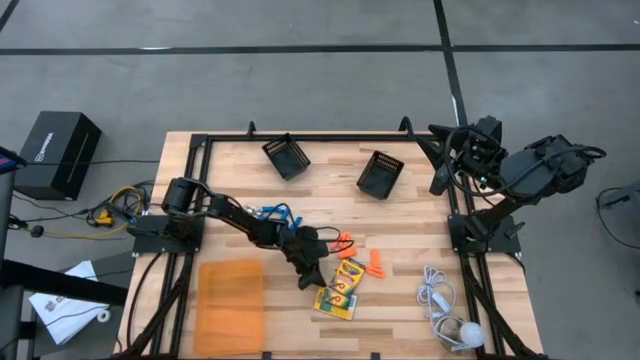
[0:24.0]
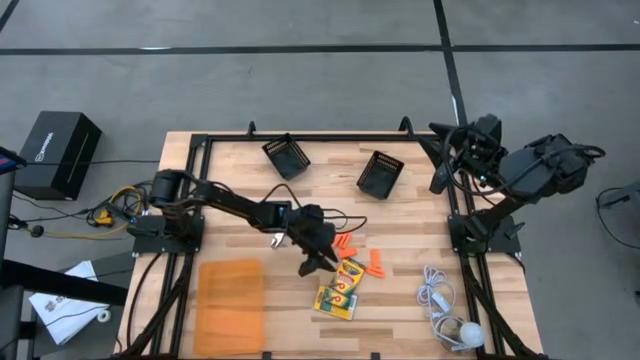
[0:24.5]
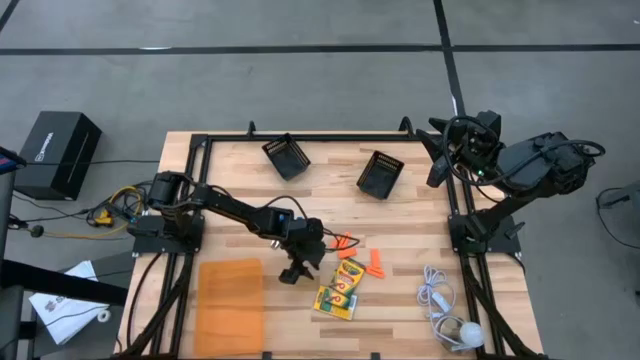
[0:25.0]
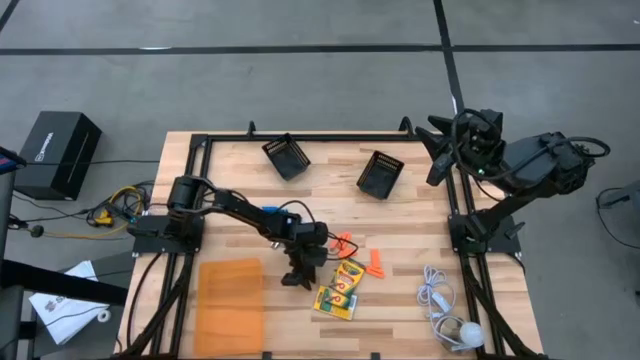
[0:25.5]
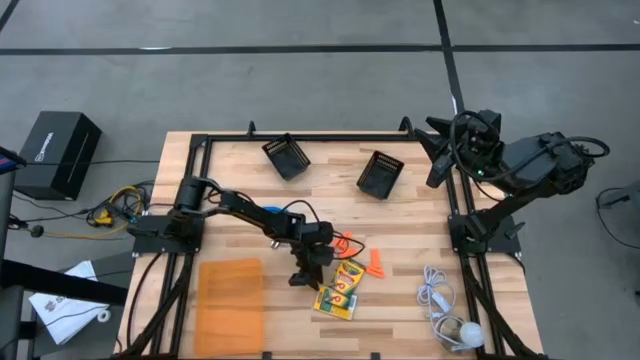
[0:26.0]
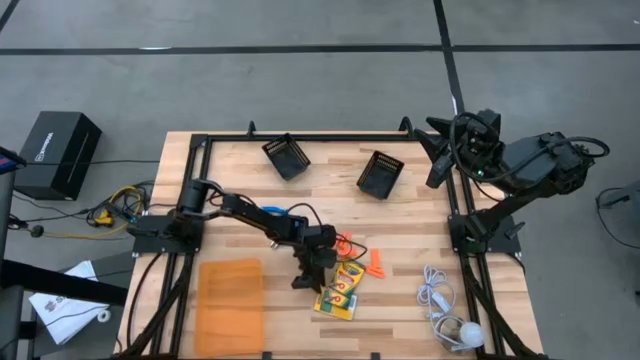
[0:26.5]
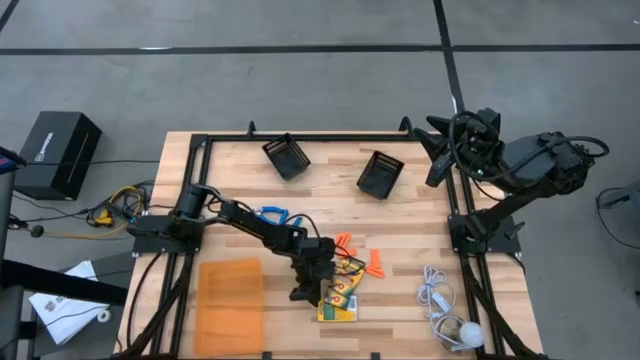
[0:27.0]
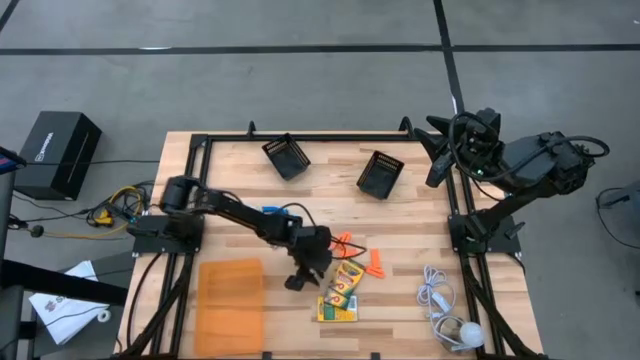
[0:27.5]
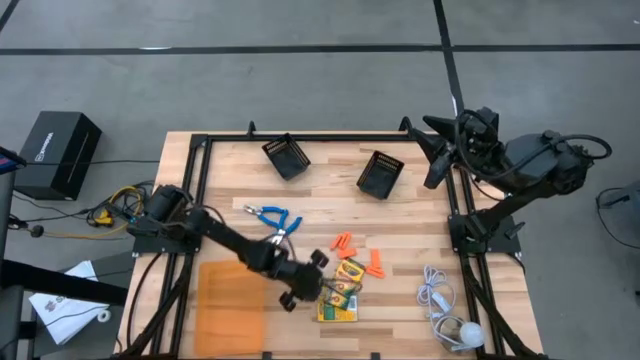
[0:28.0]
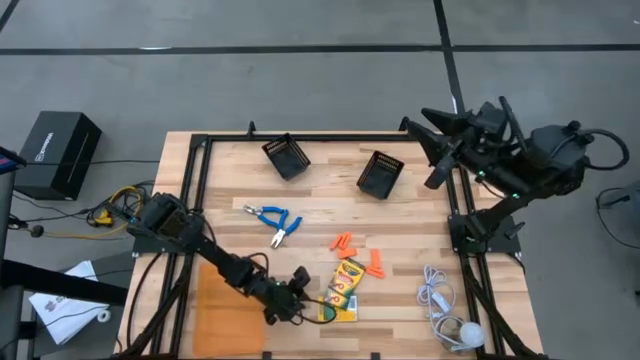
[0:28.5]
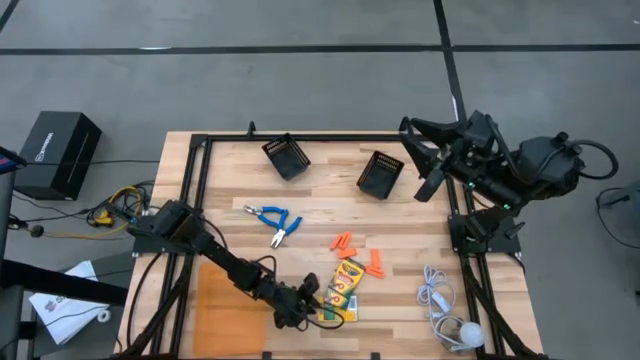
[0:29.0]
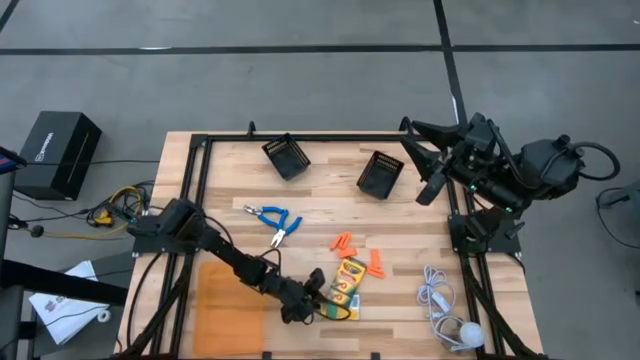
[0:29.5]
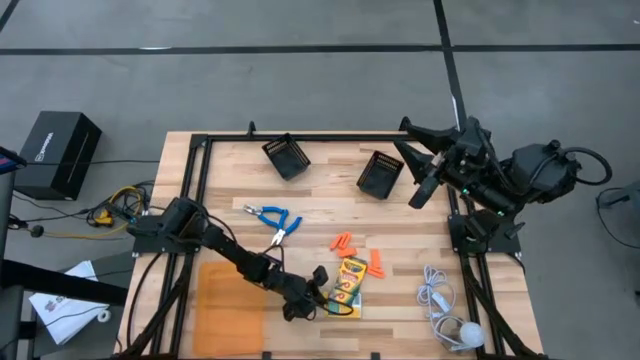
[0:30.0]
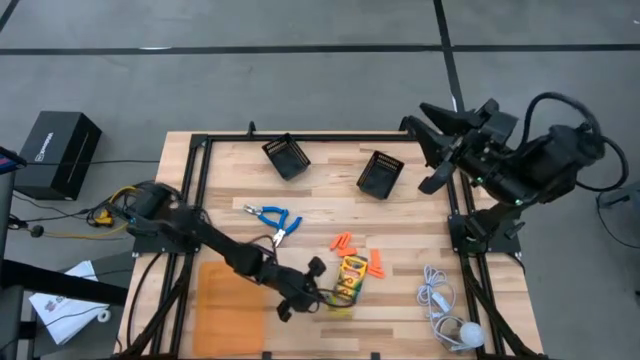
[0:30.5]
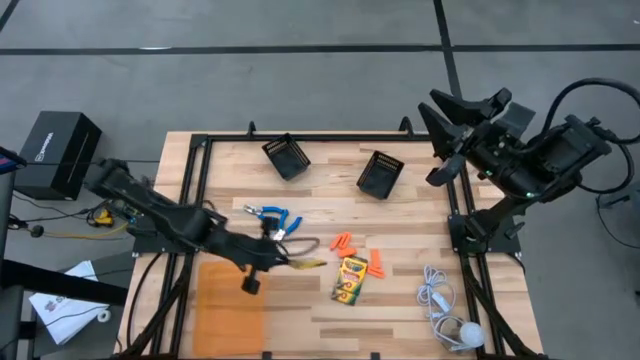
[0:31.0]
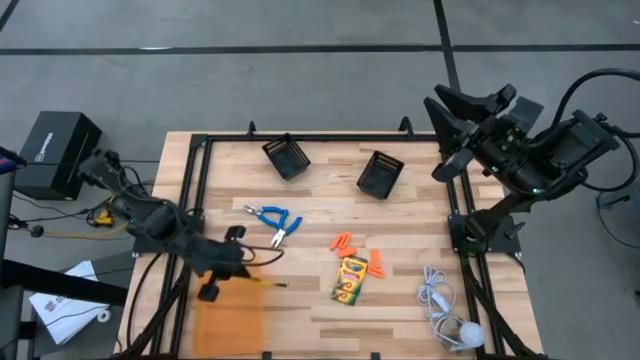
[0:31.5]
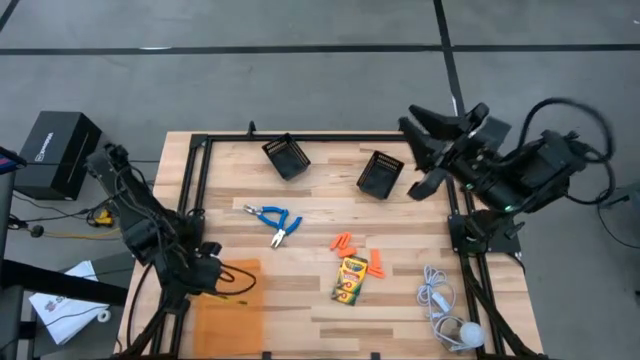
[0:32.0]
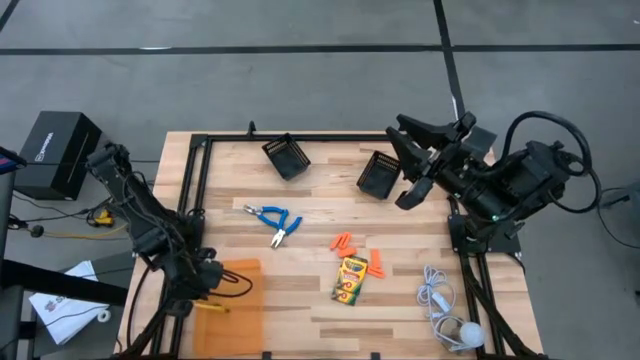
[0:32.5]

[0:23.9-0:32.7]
Task: Pick & Place School Supplies
Put the crayon box into the orange transparent bin

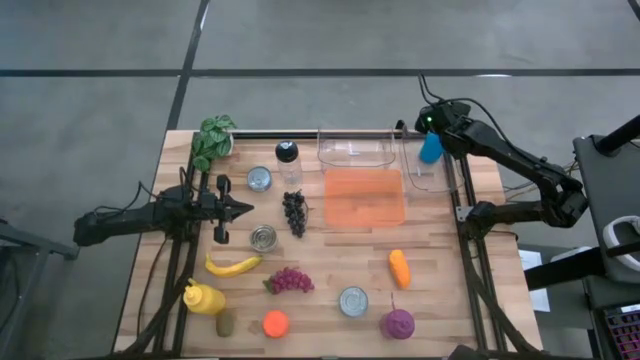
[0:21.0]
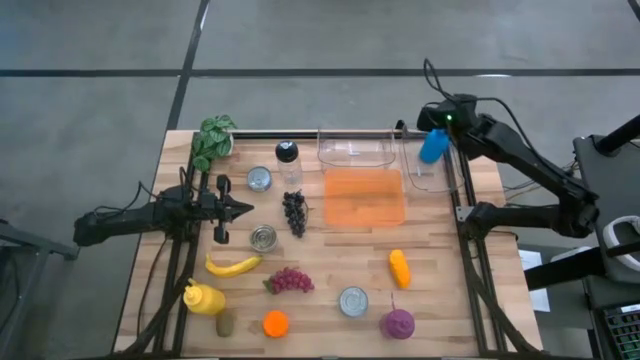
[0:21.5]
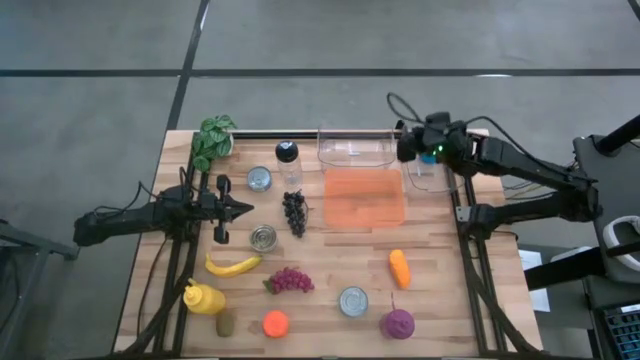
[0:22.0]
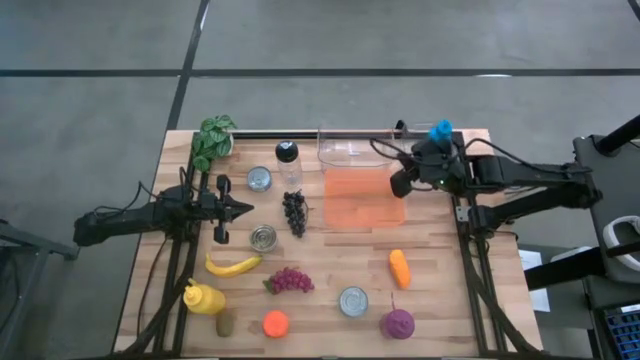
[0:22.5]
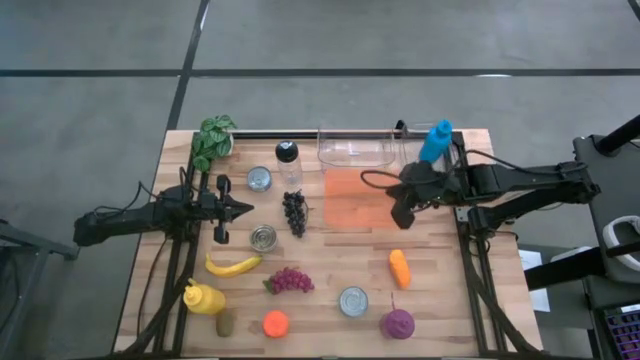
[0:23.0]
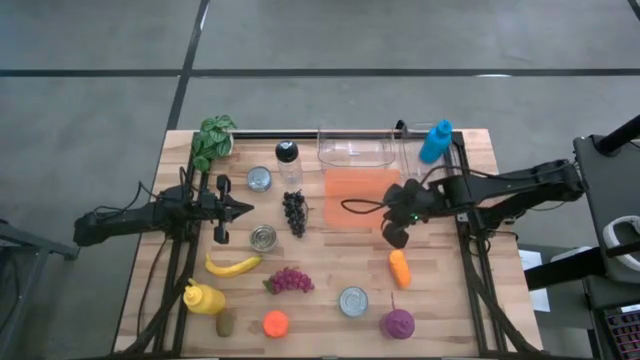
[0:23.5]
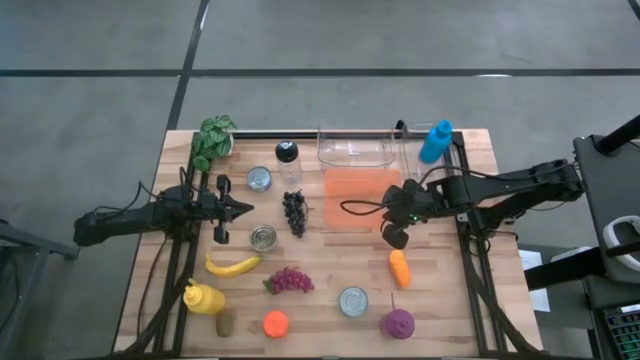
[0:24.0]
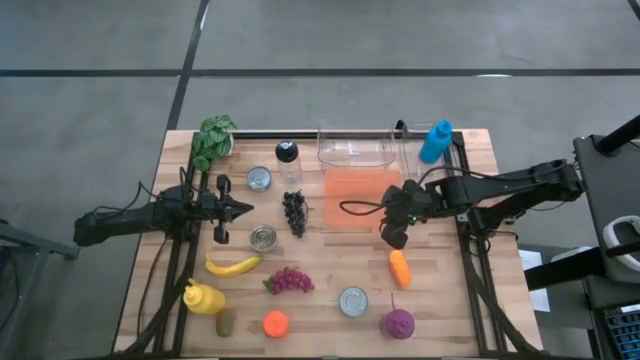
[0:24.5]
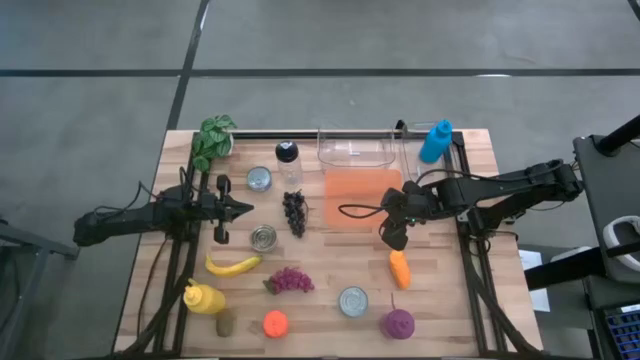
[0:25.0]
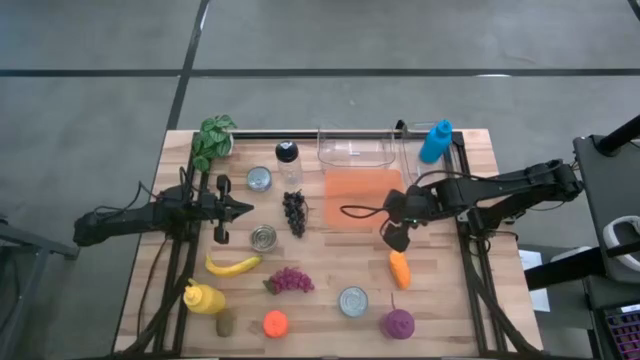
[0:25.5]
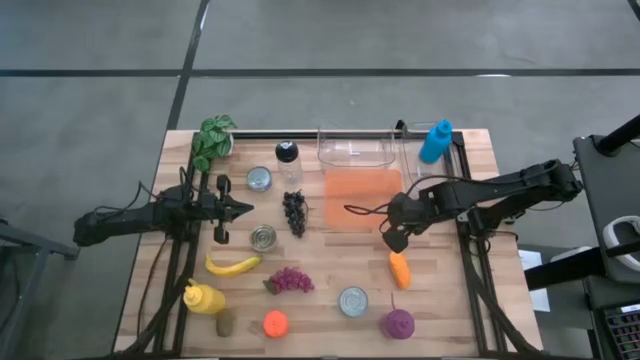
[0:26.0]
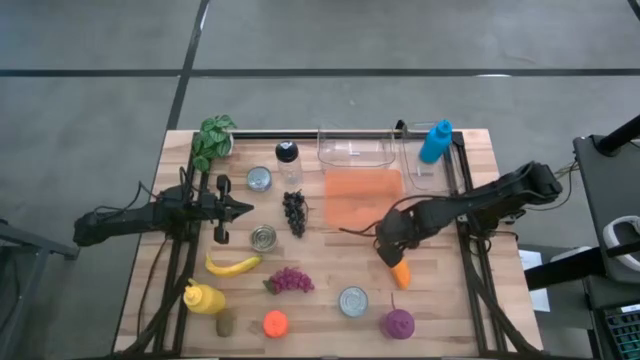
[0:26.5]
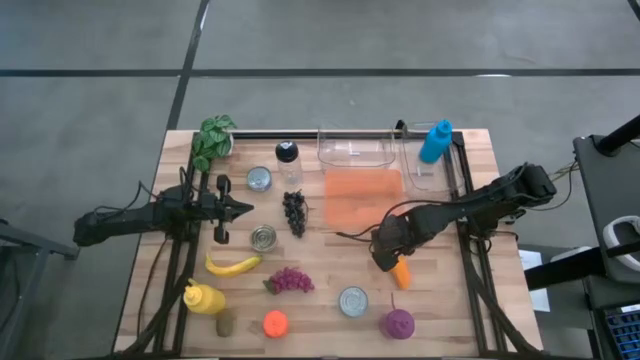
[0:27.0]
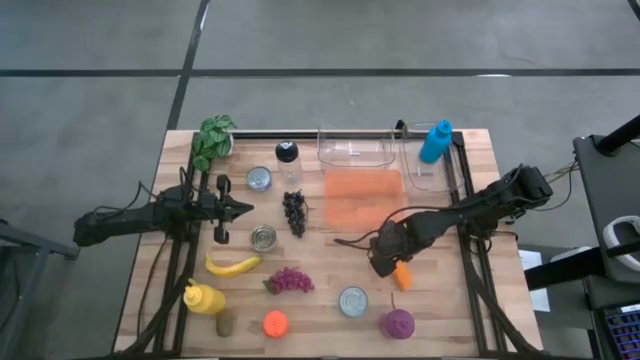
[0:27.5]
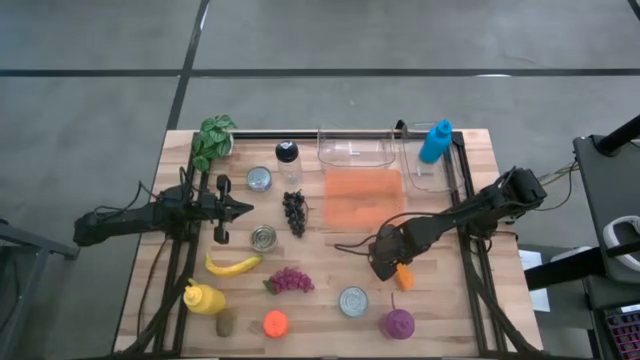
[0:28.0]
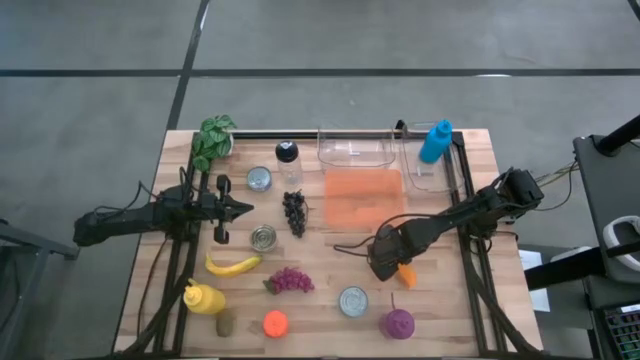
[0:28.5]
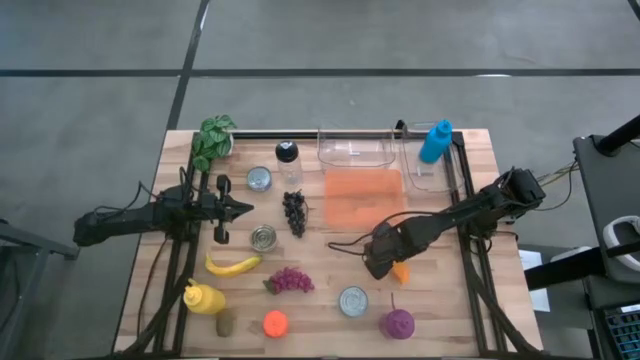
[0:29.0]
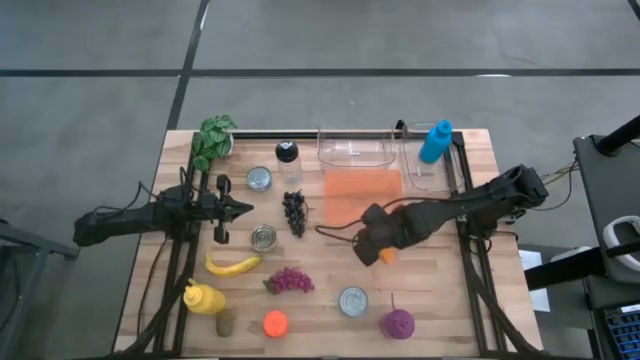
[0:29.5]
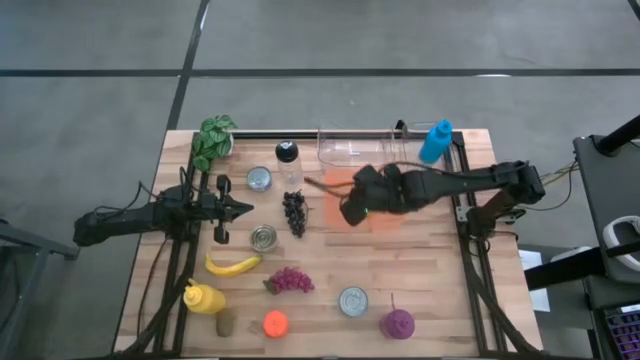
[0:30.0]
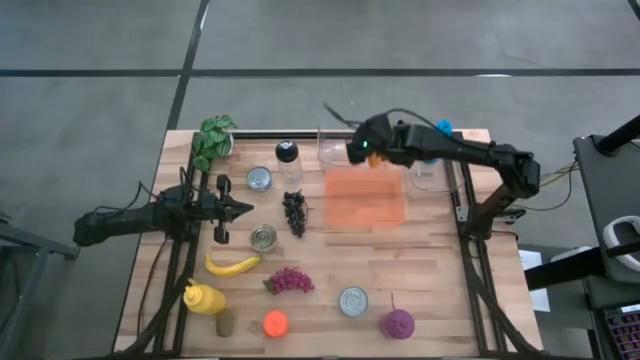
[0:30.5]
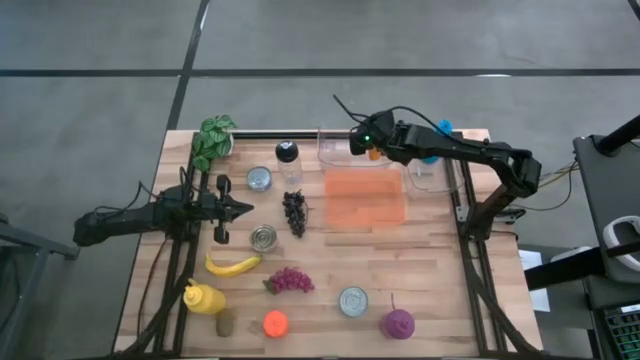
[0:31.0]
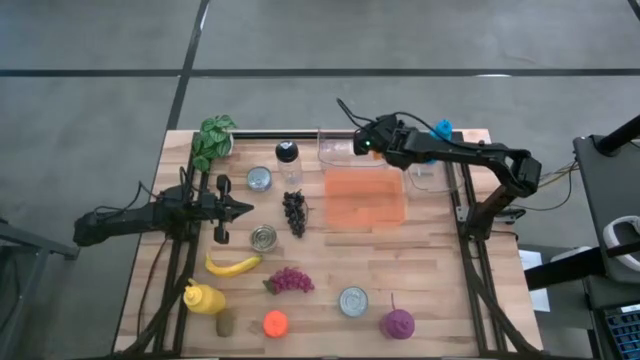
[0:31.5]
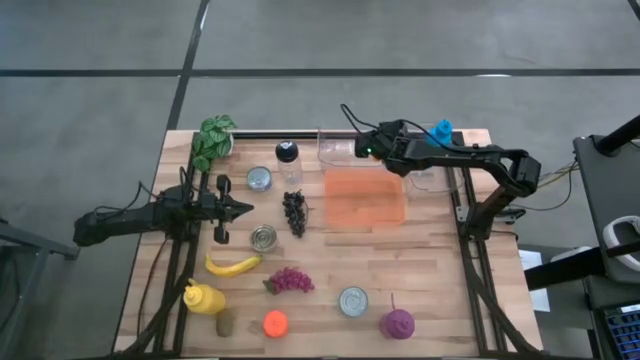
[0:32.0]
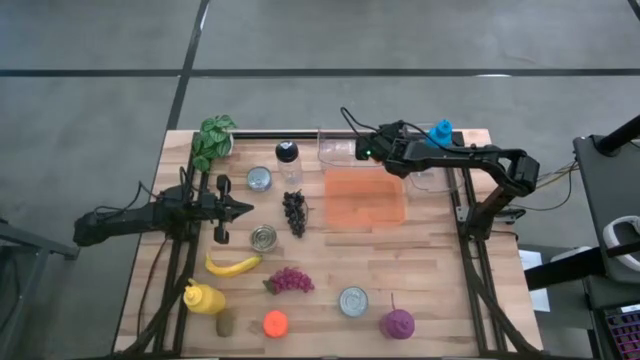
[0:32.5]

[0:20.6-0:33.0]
Task: Pick & Place Food Item
Put the mango into the left transparent bin
